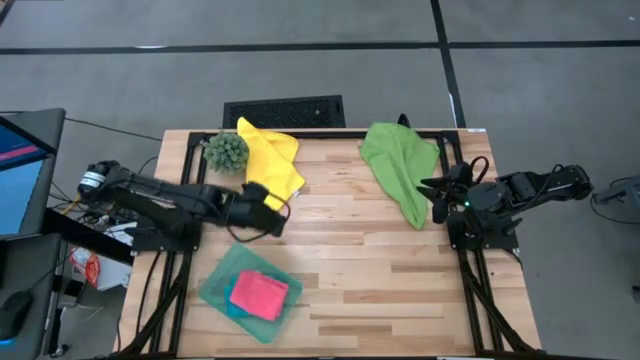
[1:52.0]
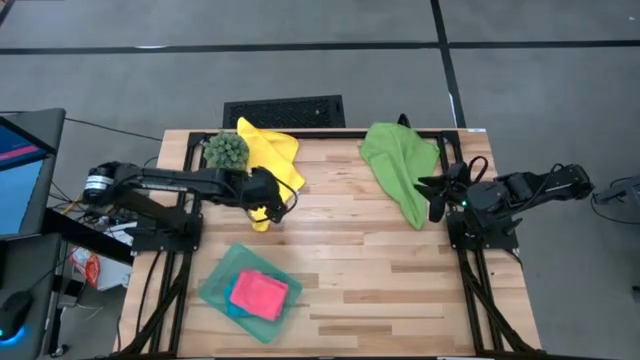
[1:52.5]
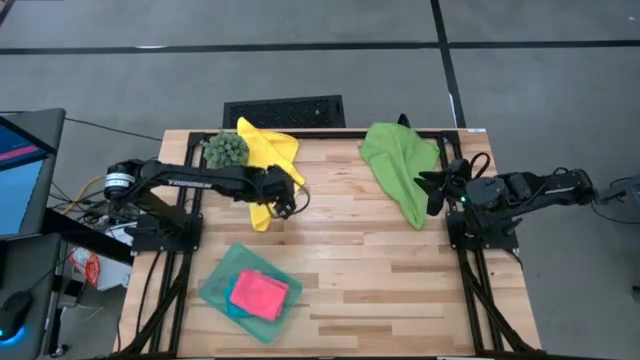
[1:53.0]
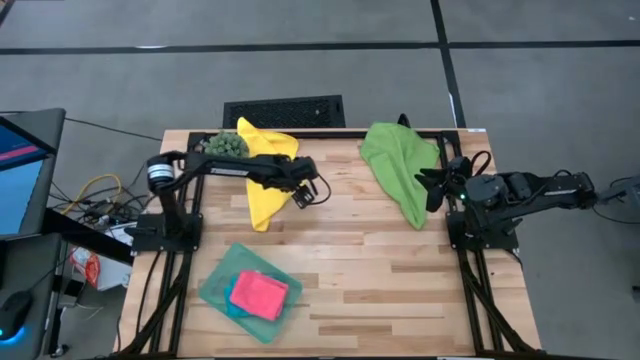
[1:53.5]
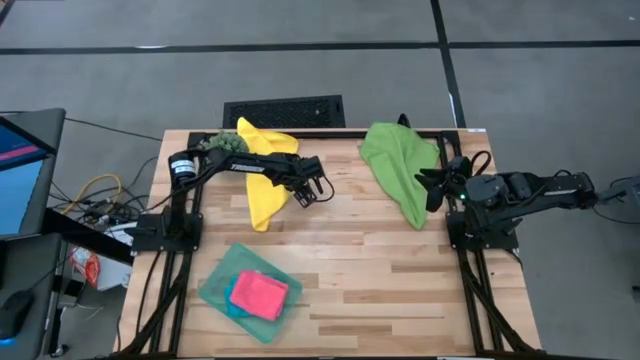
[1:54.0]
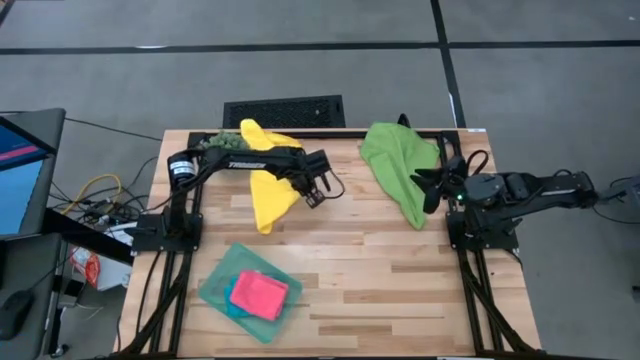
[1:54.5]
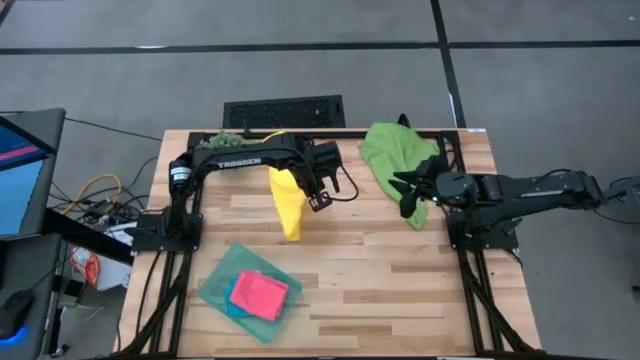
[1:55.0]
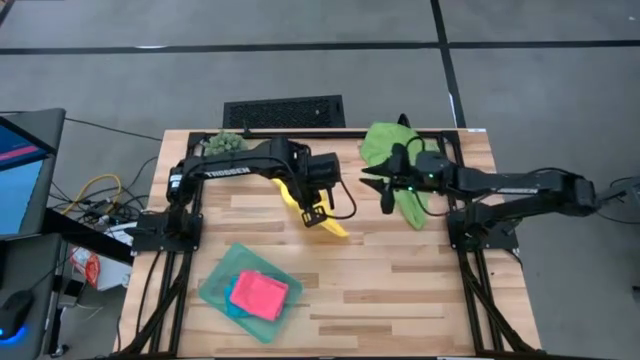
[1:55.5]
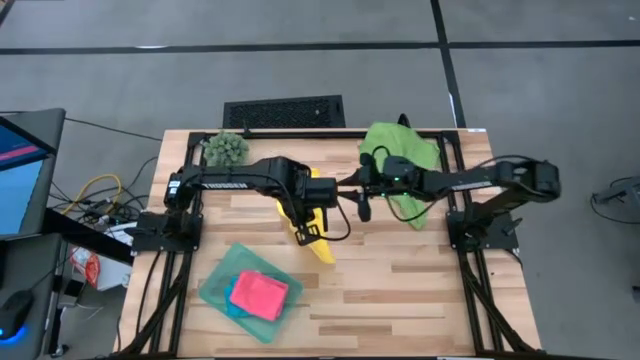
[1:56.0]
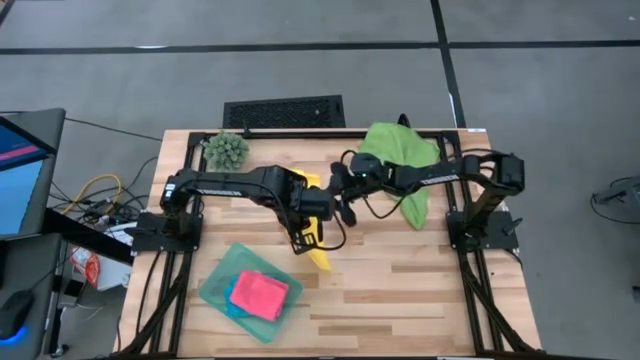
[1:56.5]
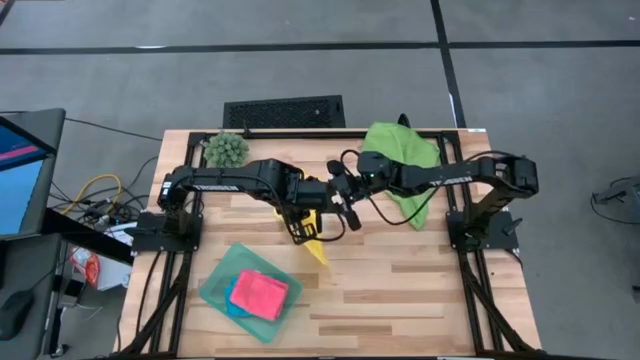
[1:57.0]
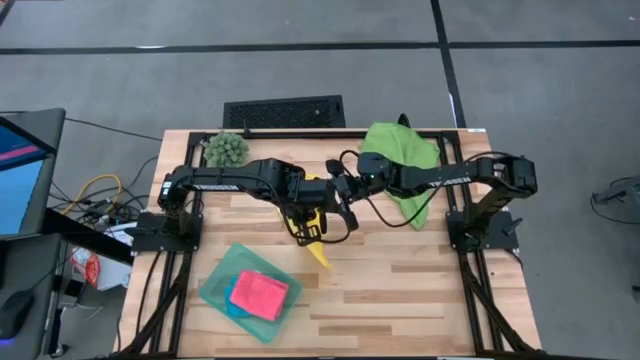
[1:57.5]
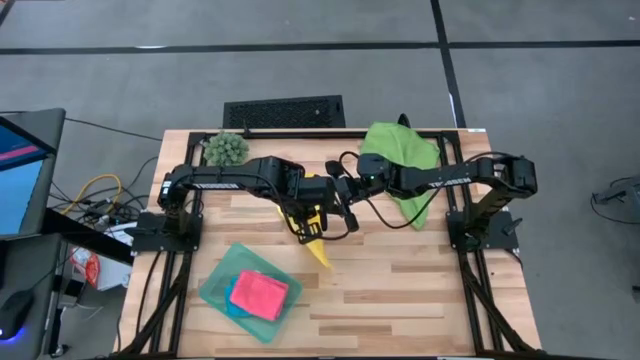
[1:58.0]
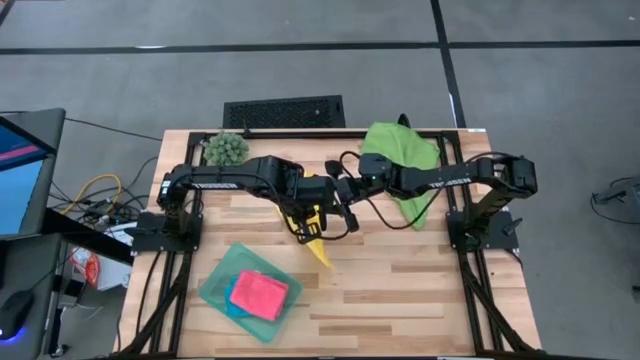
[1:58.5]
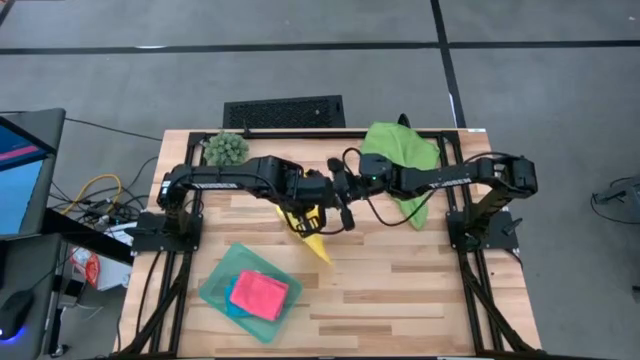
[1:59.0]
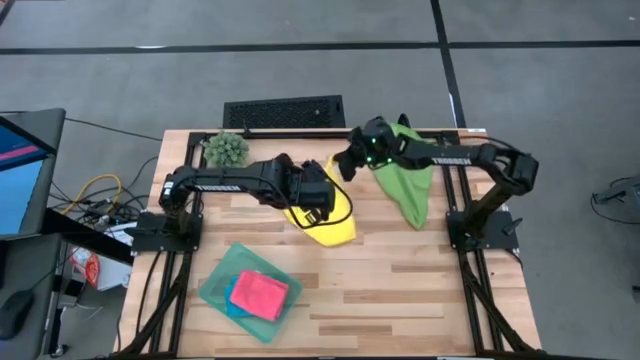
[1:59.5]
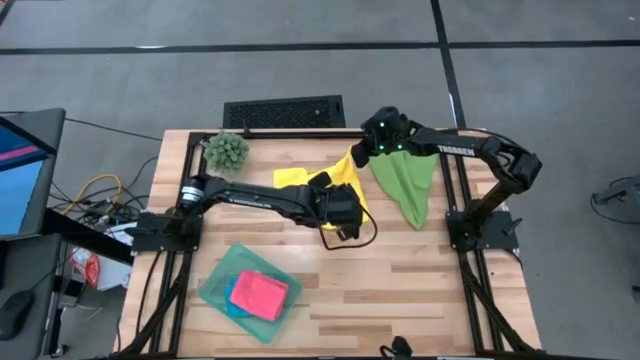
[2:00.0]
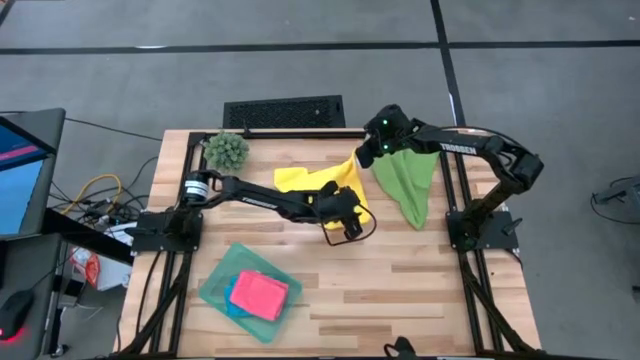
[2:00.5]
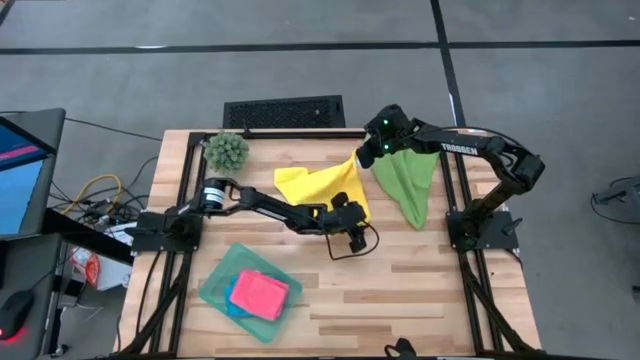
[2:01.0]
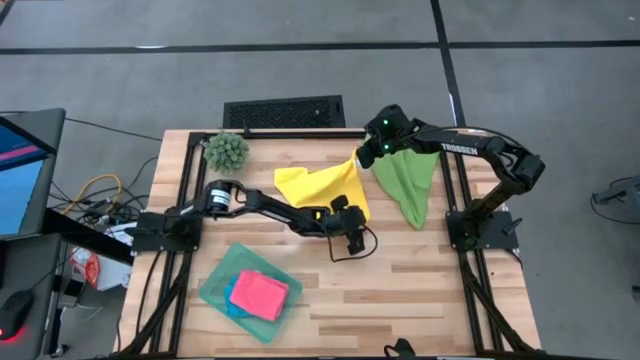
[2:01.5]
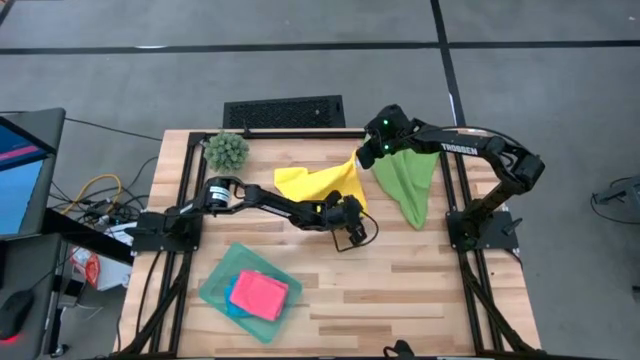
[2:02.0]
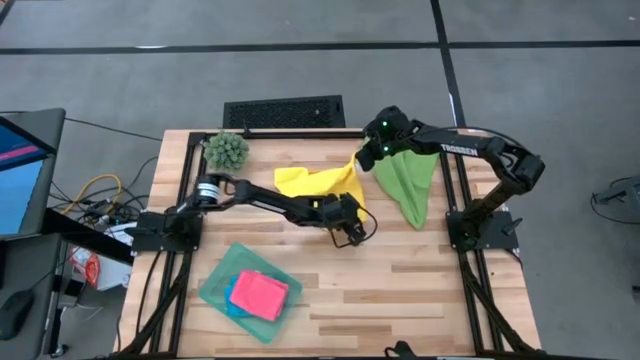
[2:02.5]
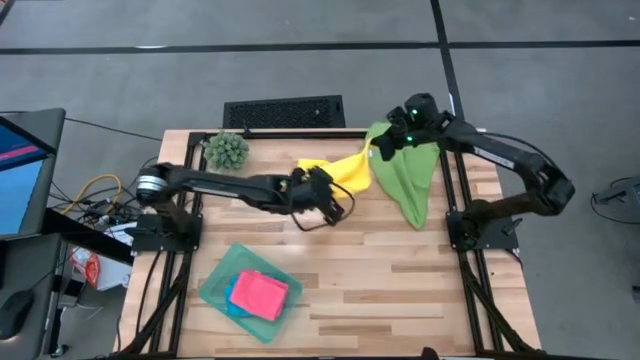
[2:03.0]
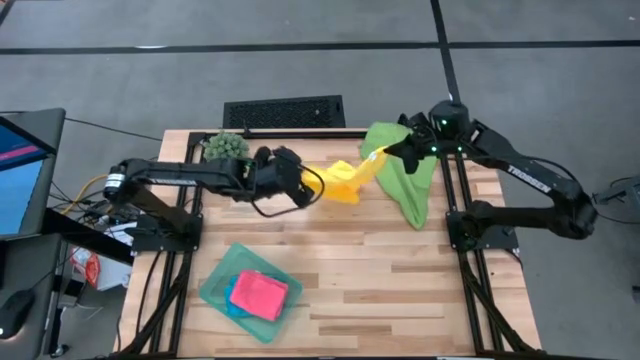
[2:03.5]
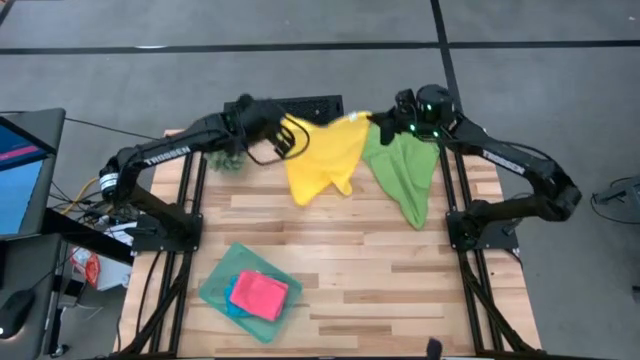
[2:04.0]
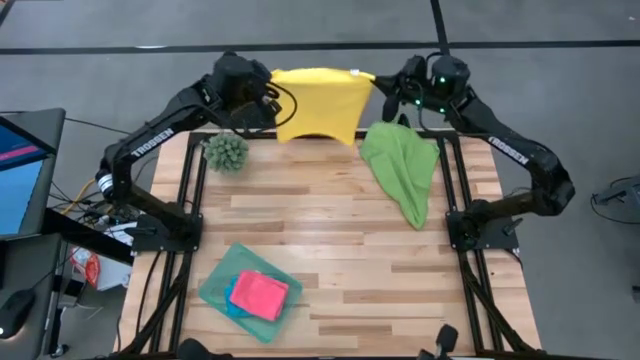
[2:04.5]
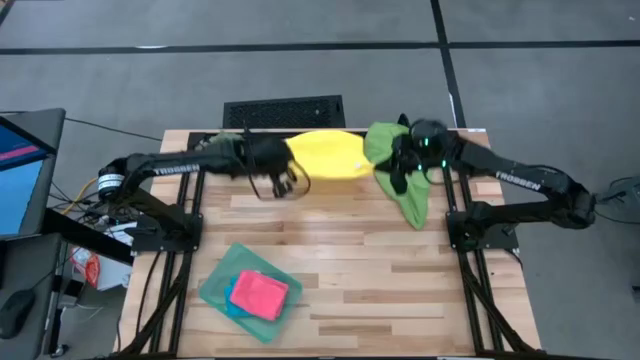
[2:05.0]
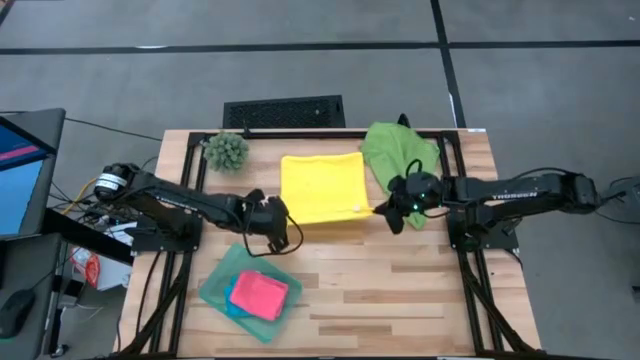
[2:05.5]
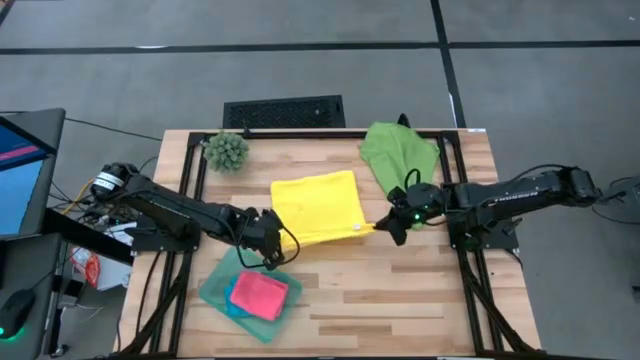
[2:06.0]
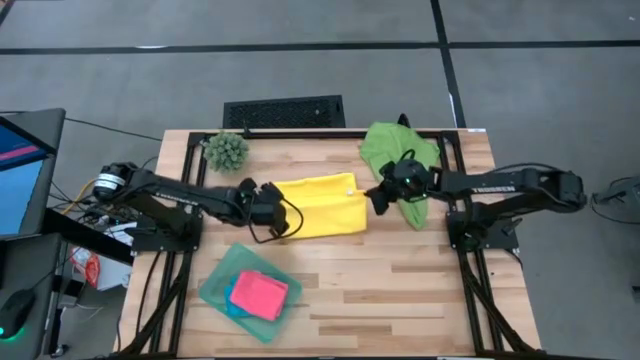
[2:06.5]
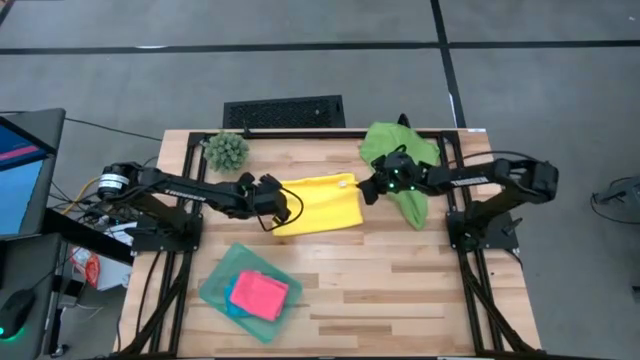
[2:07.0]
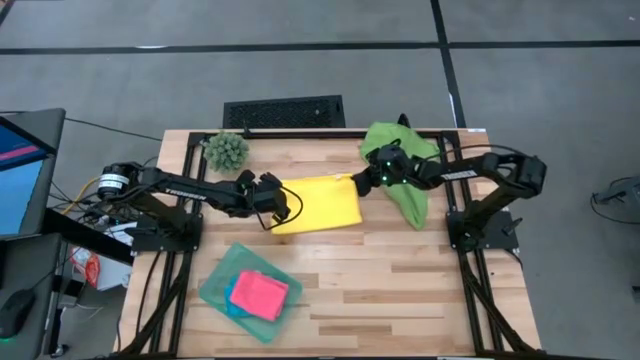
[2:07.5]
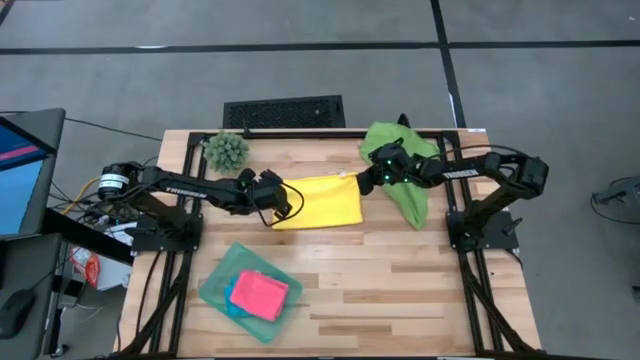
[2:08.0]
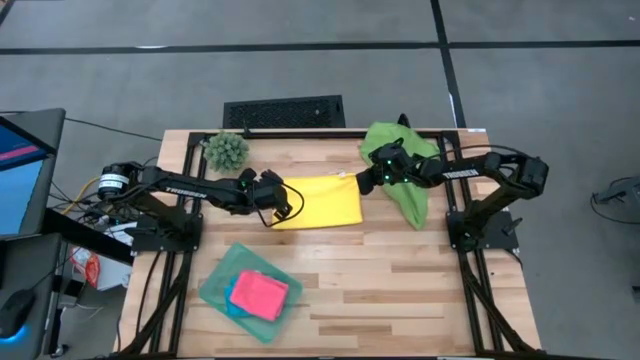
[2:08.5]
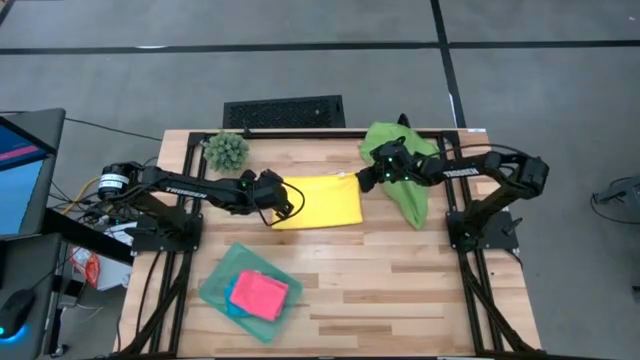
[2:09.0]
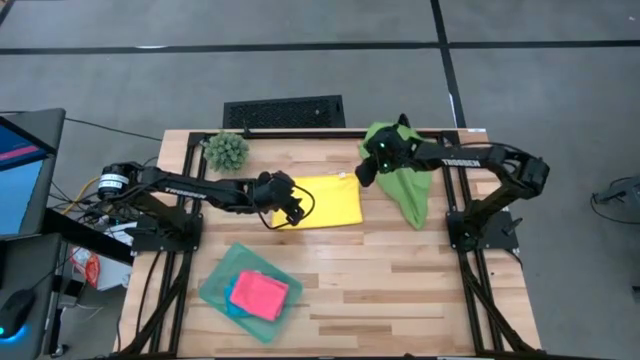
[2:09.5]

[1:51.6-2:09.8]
Task: Fold microfiber towels
Fold the yellow microfiber towel

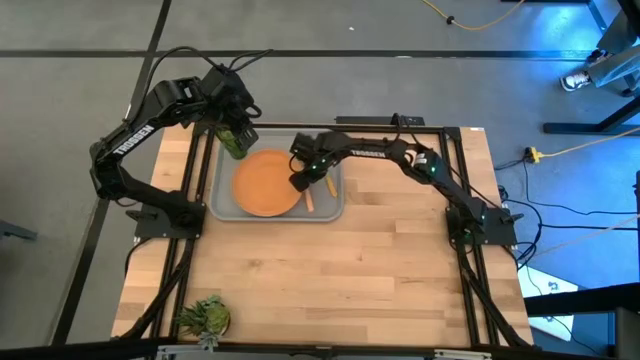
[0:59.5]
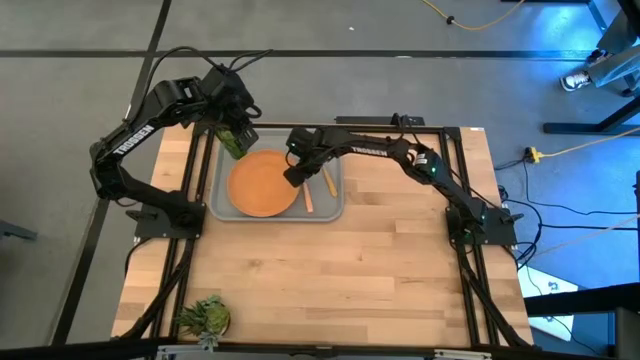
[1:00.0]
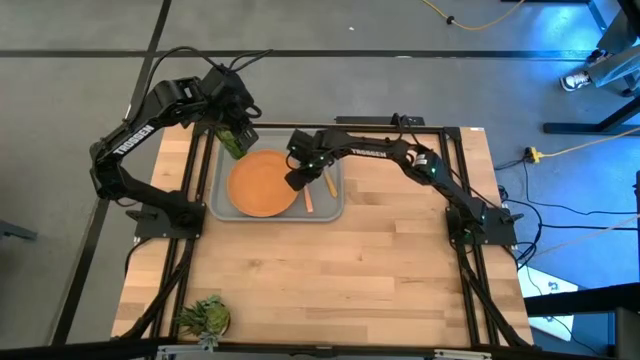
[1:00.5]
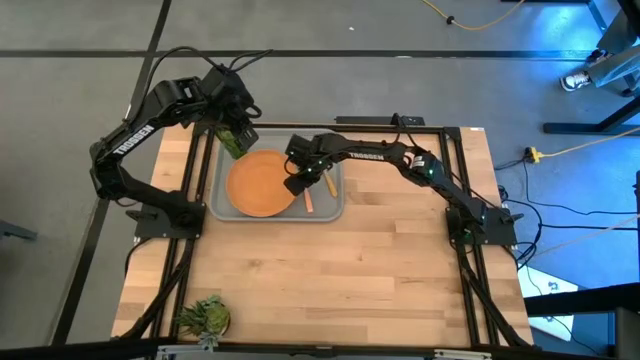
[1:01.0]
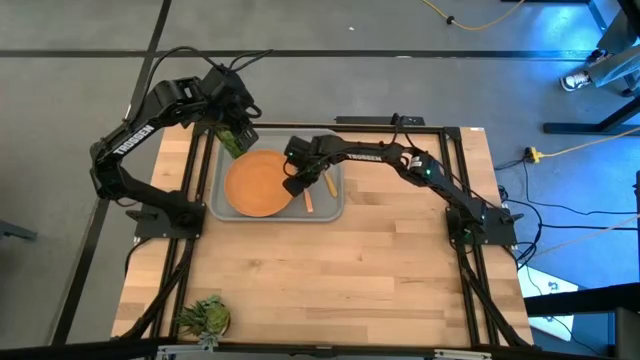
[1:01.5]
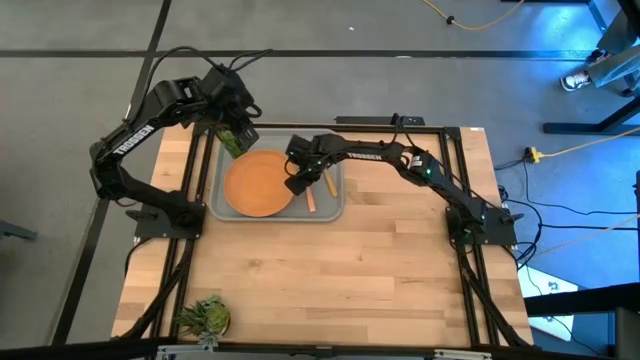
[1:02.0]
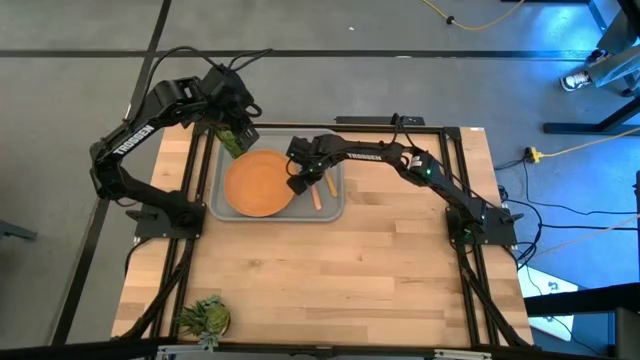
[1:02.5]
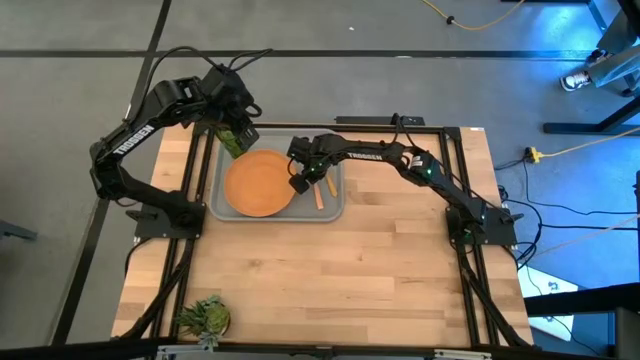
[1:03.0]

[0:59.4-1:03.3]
Task: Pick and place plate/cup/fork/spoon on tray
Adjust the orange fork on the gray serving tray

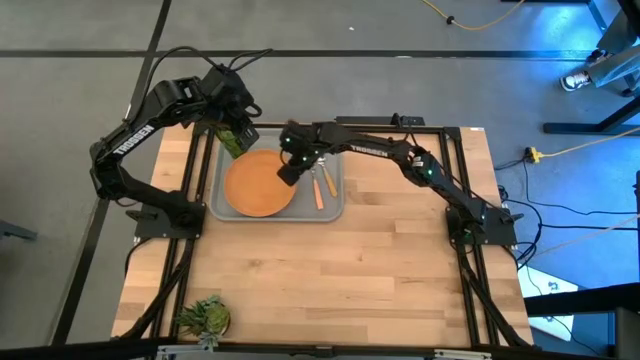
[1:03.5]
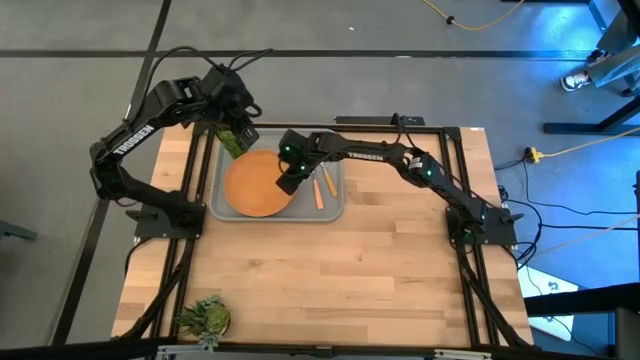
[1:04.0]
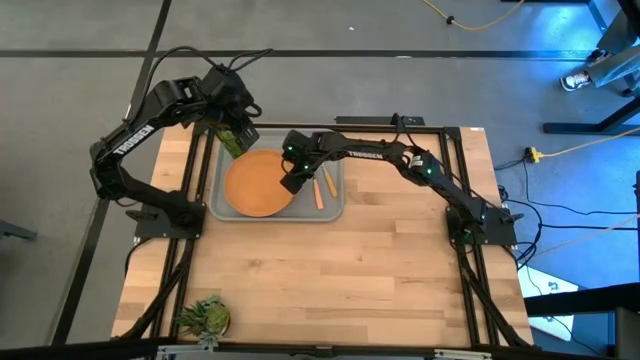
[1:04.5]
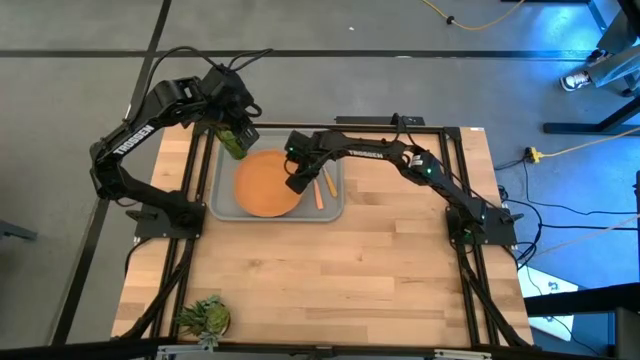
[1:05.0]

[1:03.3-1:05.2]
Adjust the orange plate on the gray serving tray
